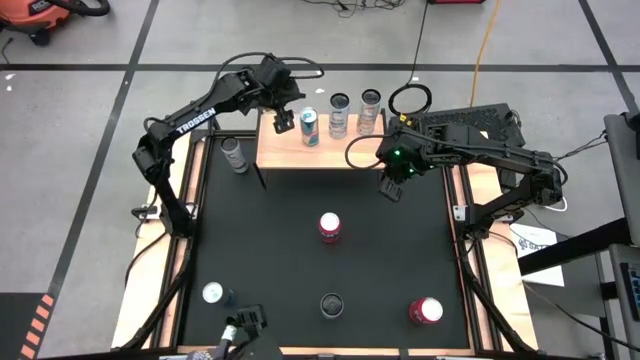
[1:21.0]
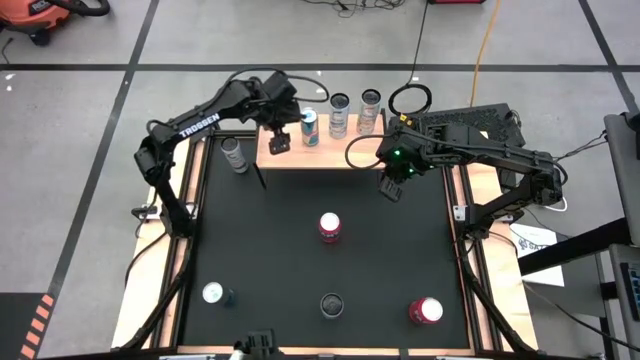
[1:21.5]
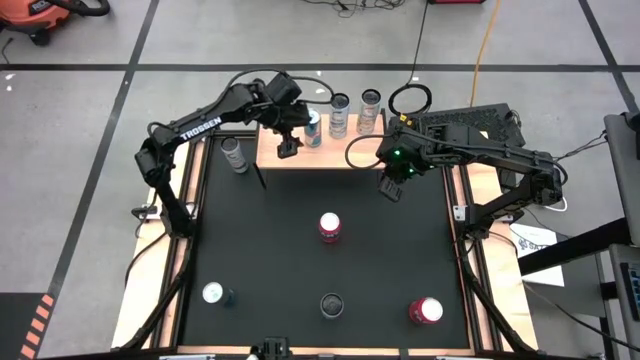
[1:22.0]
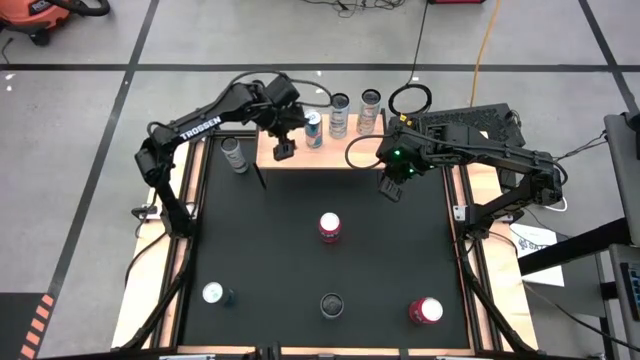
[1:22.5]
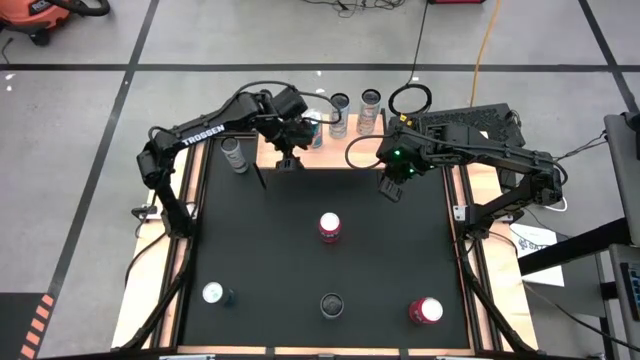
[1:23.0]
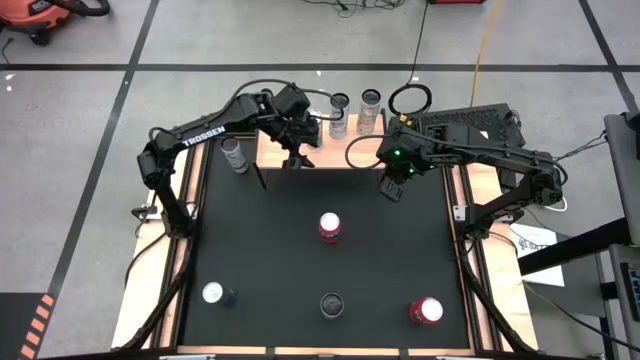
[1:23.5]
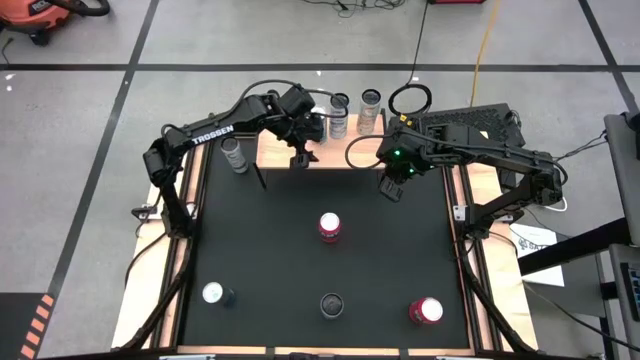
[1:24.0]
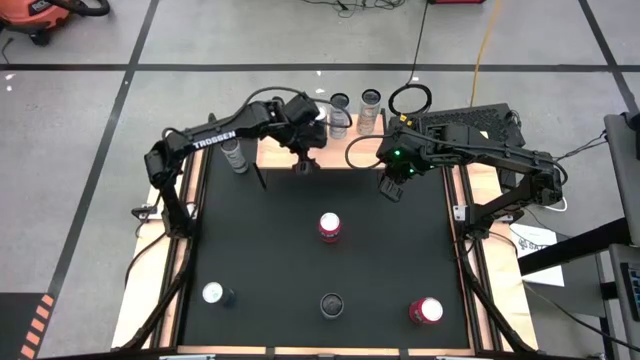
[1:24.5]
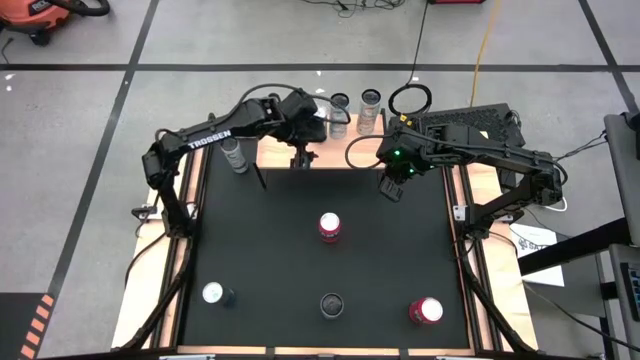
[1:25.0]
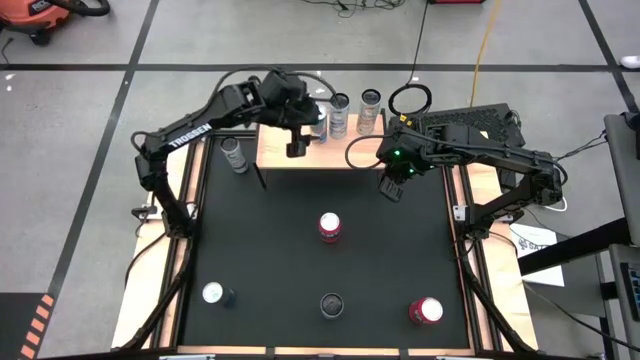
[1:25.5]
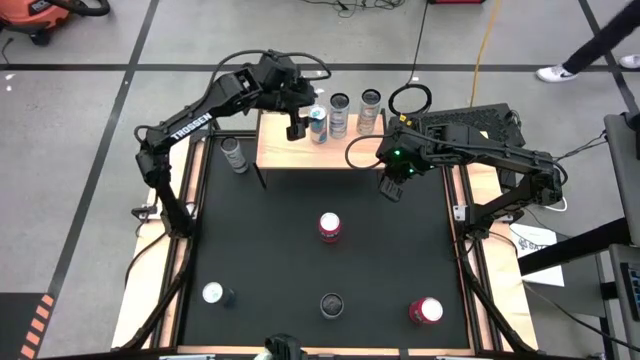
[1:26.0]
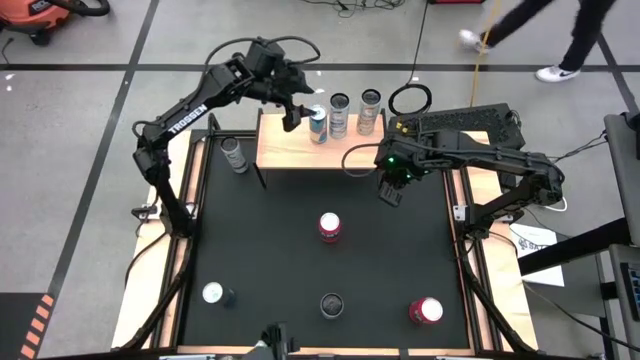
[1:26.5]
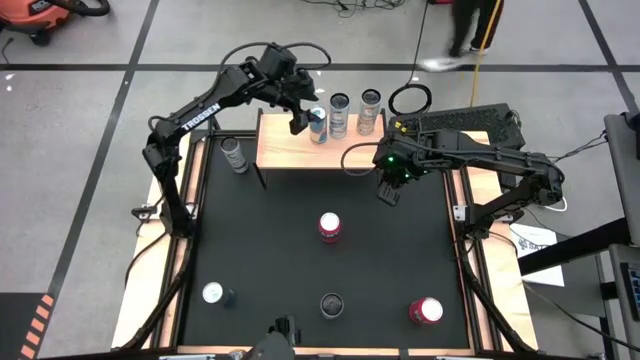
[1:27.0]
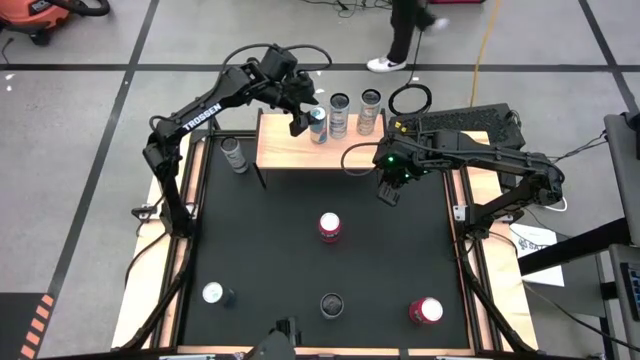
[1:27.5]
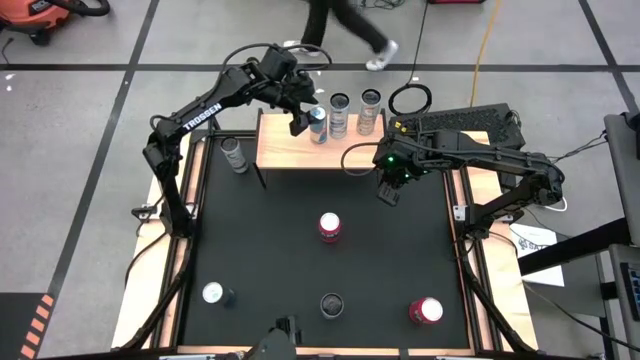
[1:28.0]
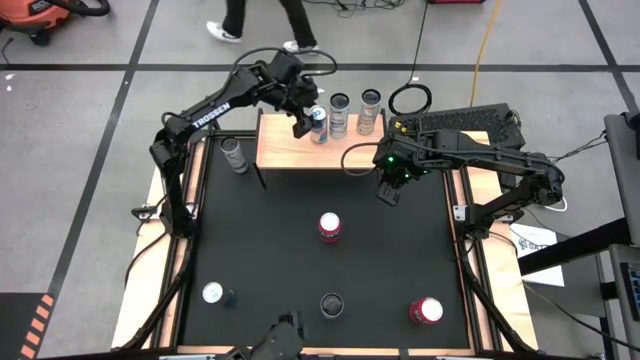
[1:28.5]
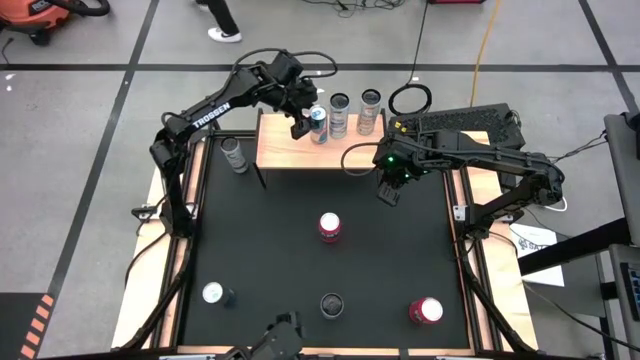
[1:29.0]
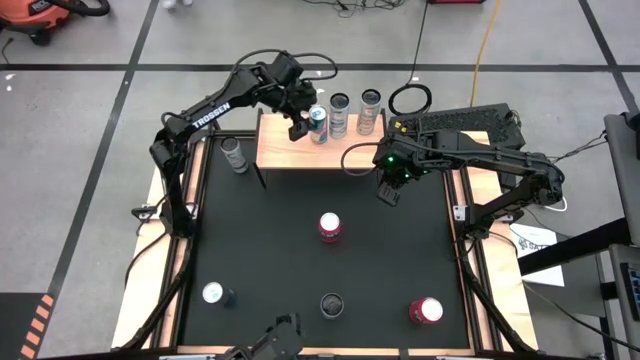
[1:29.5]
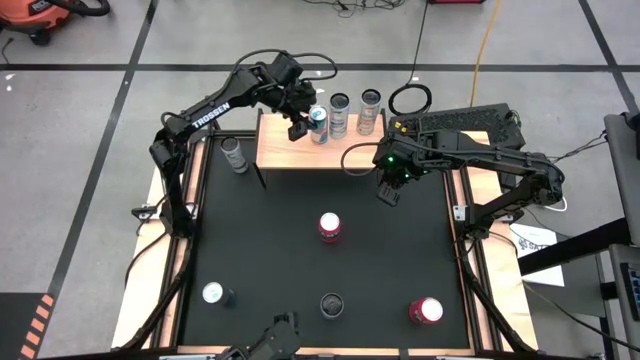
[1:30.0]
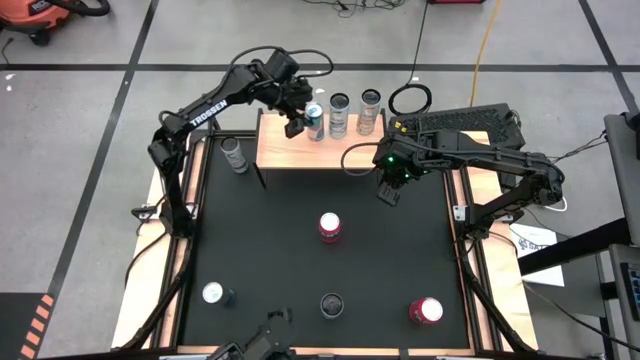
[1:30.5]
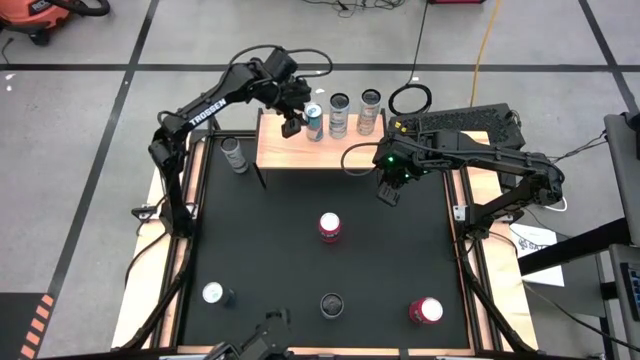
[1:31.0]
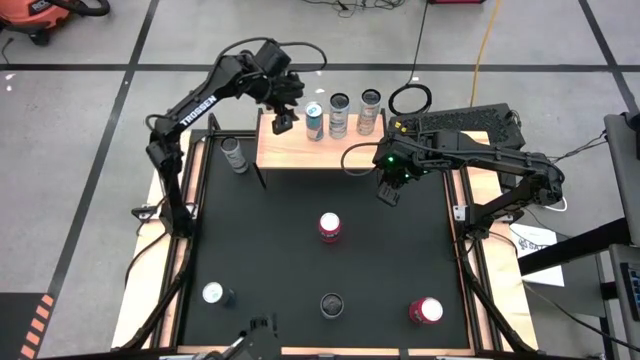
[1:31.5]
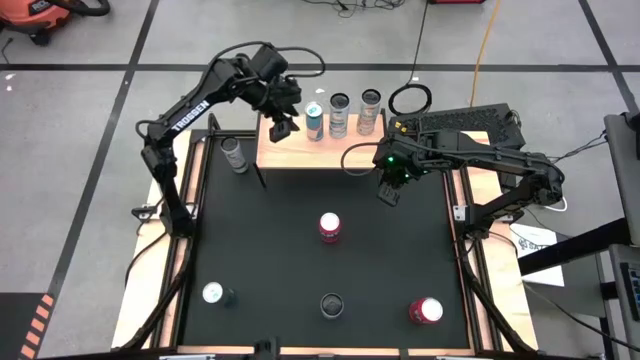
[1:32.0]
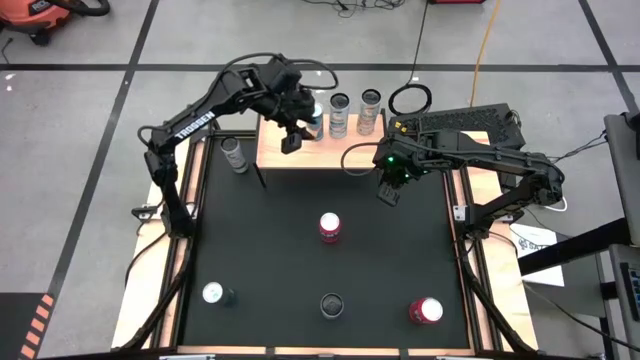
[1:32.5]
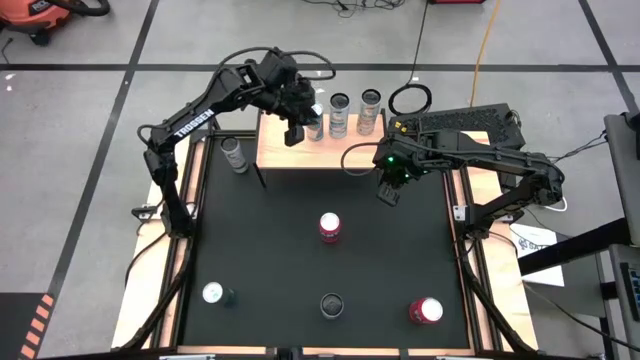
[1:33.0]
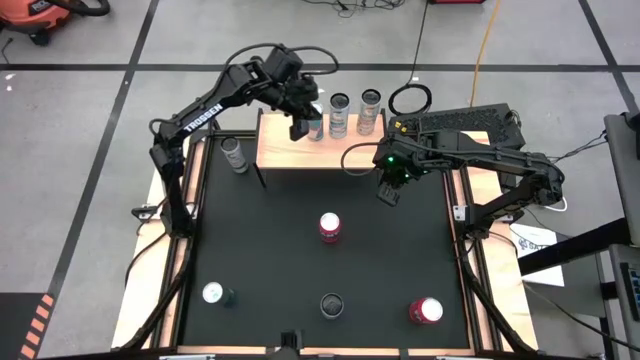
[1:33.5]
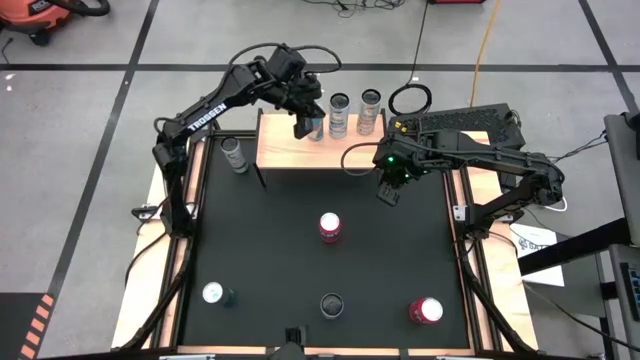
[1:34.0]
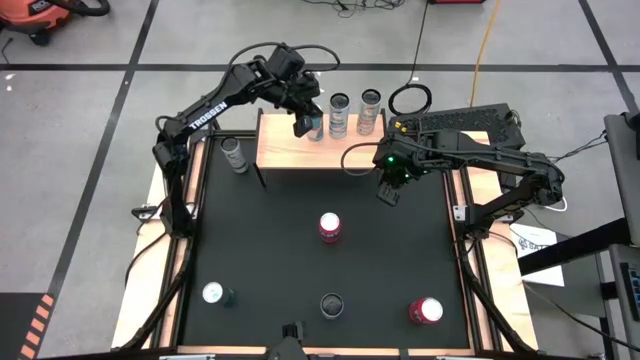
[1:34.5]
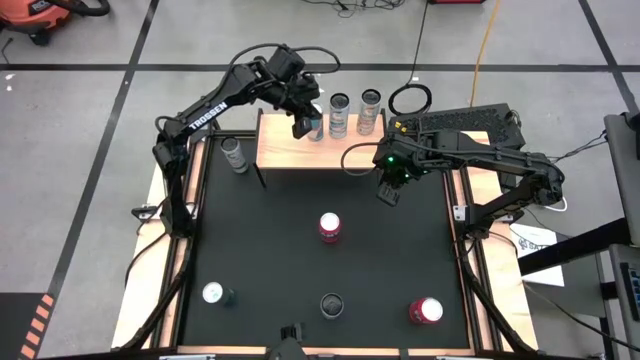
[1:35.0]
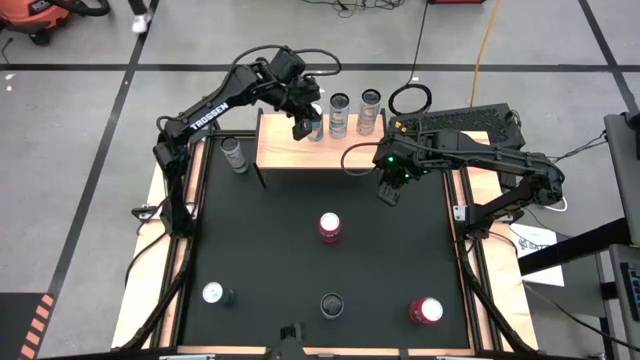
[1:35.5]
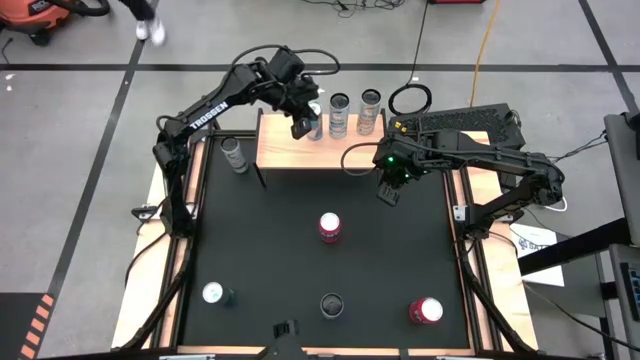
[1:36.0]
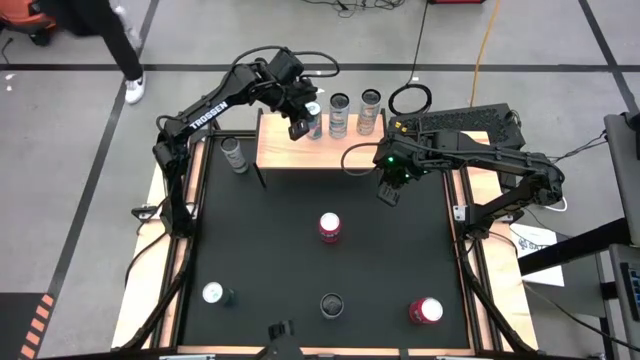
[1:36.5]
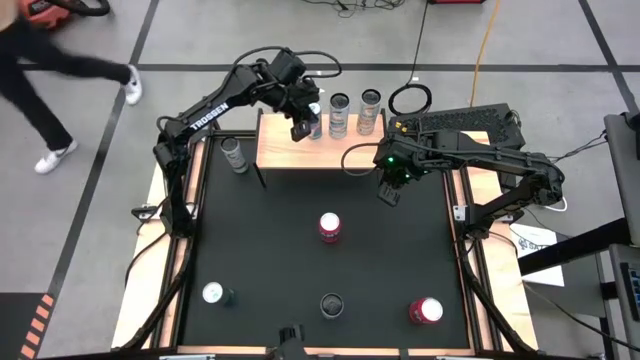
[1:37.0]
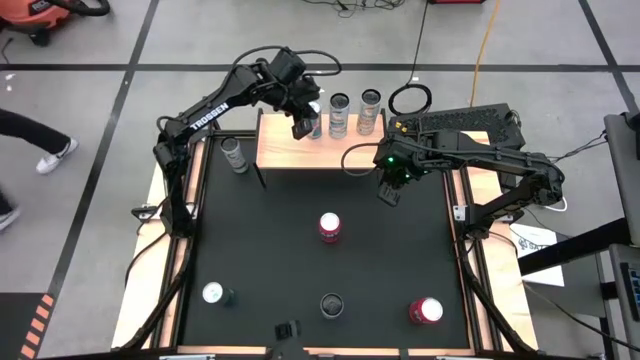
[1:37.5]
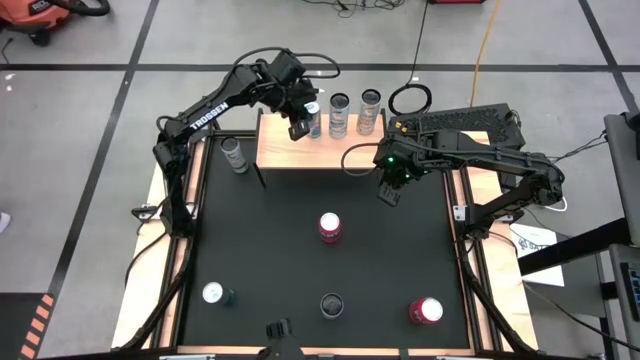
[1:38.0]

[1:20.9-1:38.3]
Task: Place canned beverage on shelf
Put the top blue soda can on the shelf

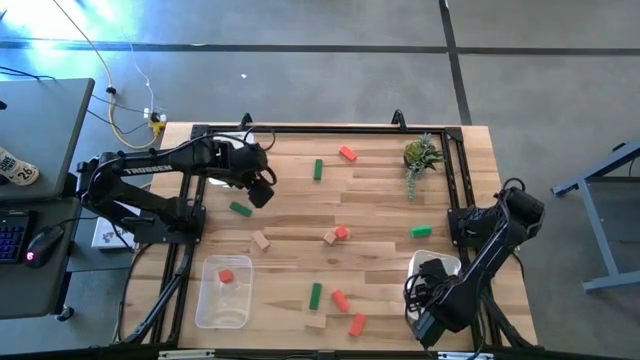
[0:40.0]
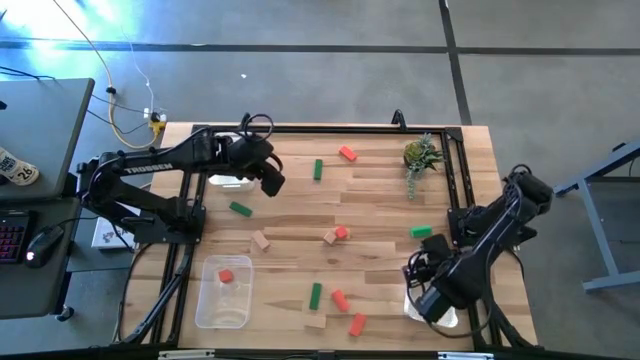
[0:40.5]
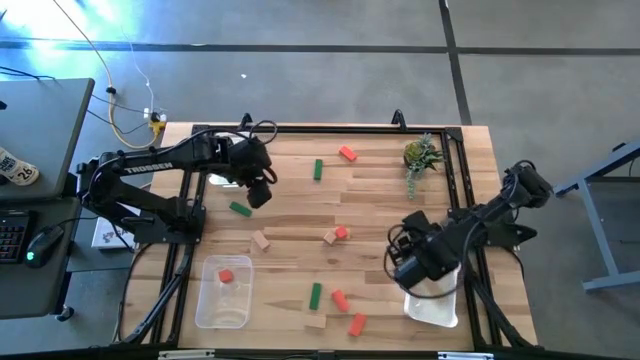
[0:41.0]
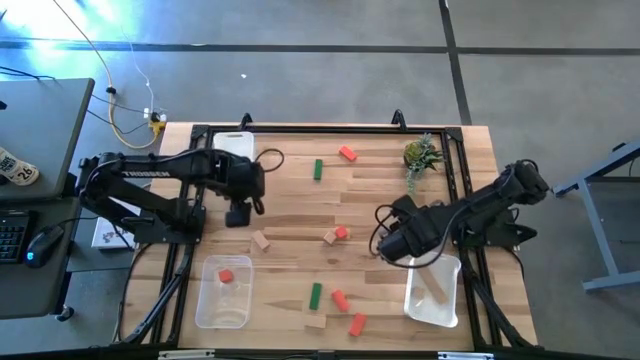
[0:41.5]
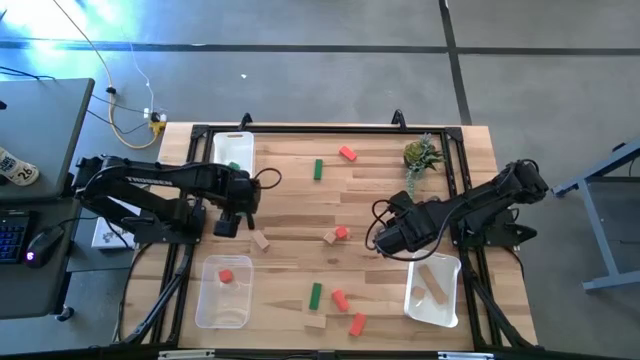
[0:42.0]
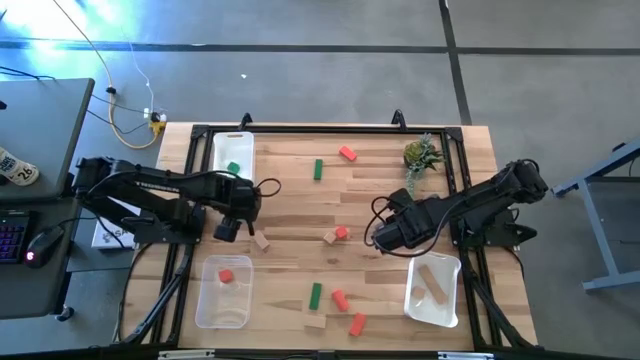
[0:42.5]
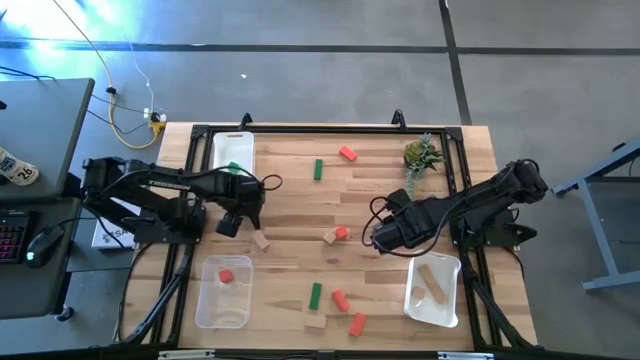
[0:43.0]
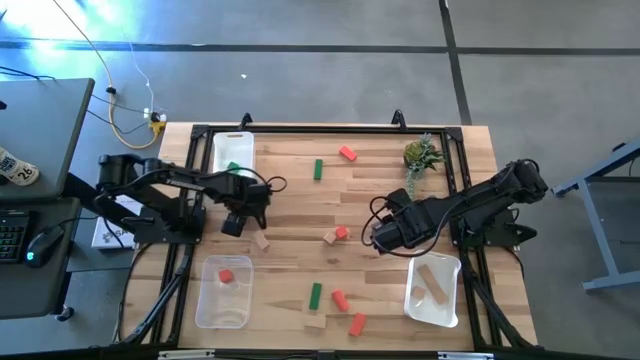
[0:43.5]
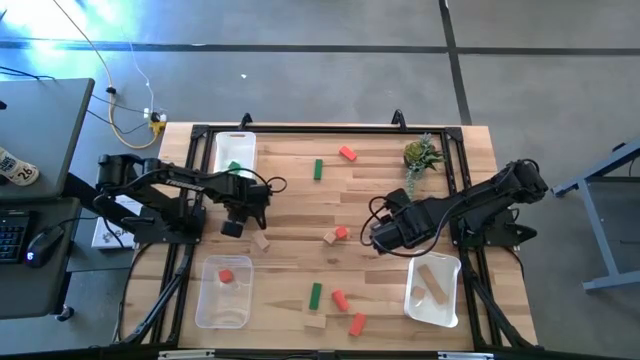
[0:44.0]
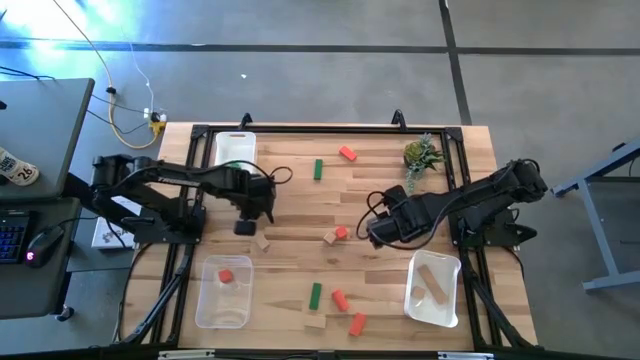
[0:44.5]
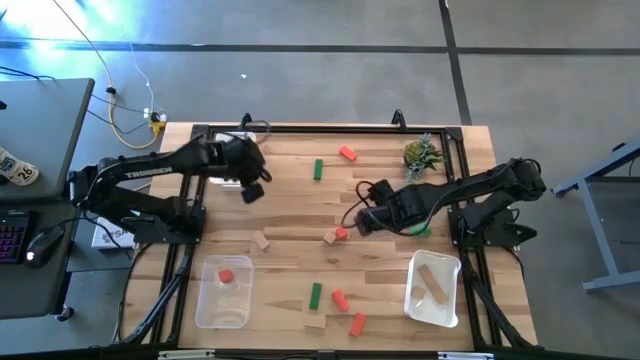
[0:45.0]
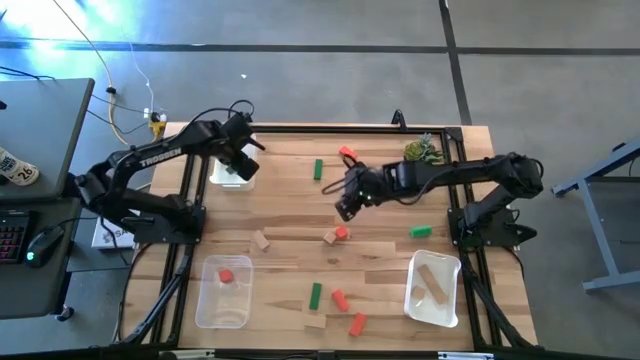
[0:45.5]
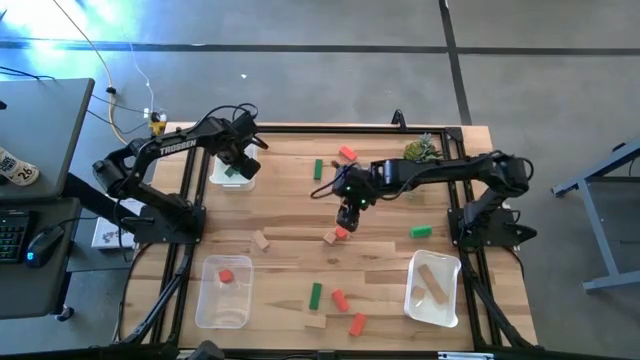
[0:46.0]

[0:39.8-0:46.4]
Task: Sort & place blocks by color
Put the green block into the top white bin
